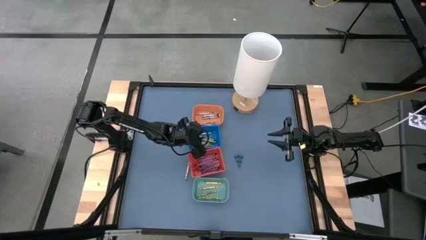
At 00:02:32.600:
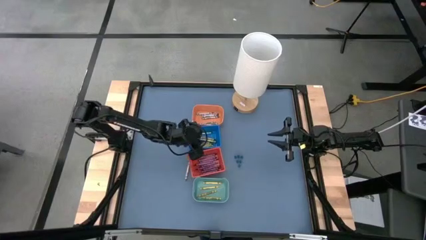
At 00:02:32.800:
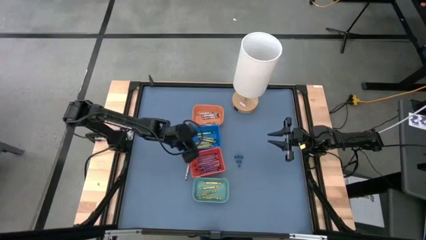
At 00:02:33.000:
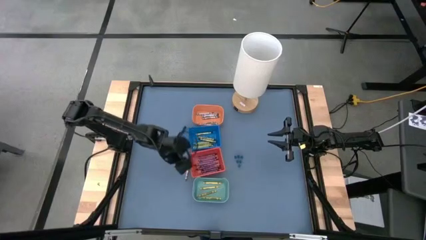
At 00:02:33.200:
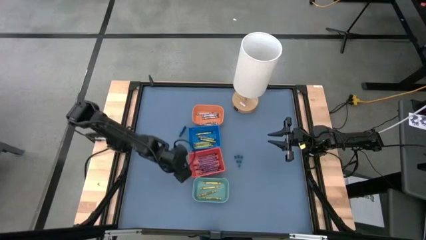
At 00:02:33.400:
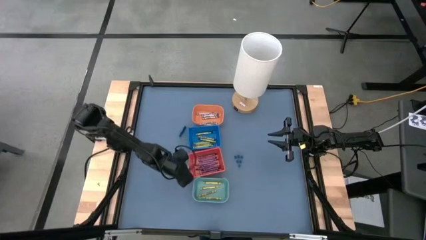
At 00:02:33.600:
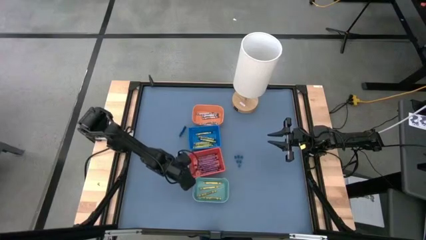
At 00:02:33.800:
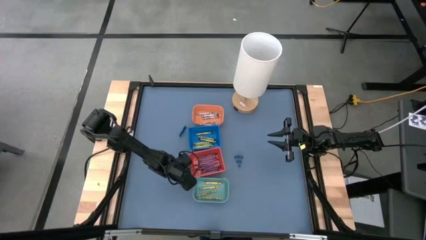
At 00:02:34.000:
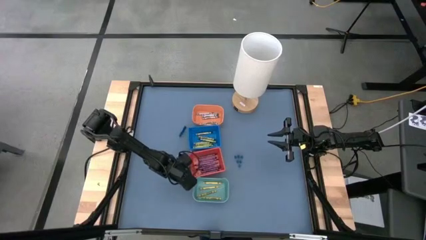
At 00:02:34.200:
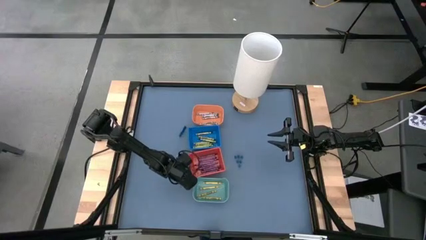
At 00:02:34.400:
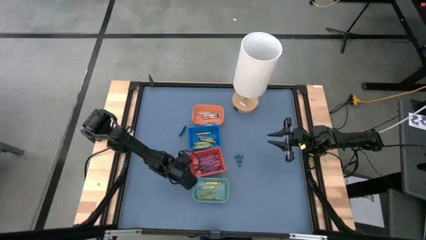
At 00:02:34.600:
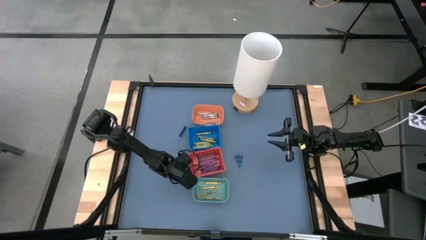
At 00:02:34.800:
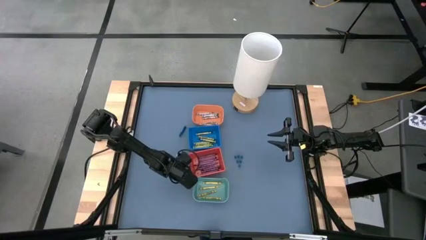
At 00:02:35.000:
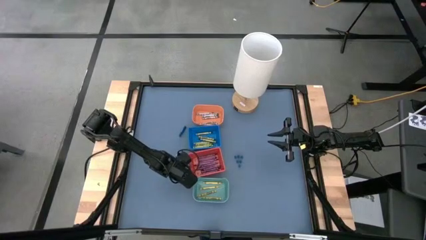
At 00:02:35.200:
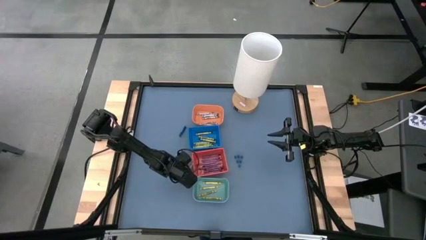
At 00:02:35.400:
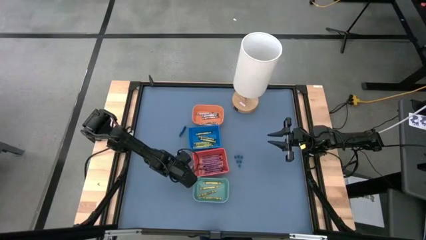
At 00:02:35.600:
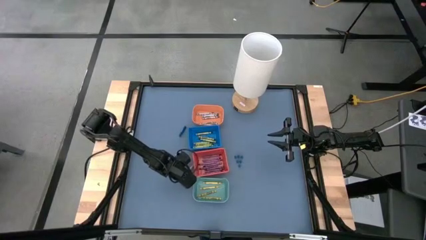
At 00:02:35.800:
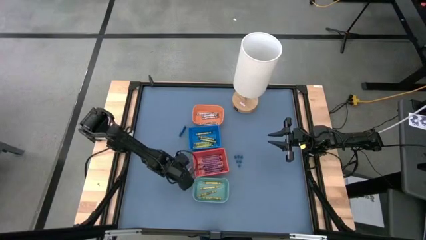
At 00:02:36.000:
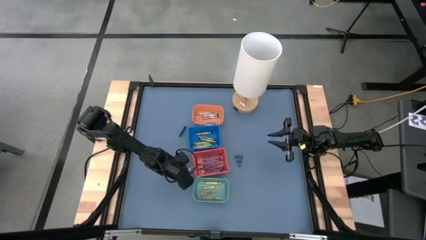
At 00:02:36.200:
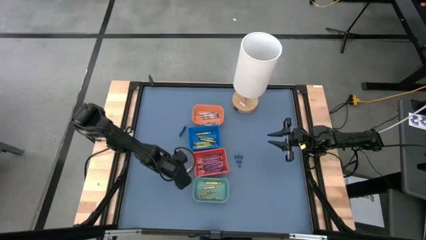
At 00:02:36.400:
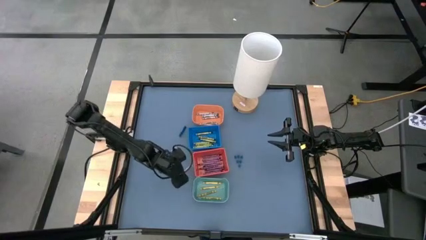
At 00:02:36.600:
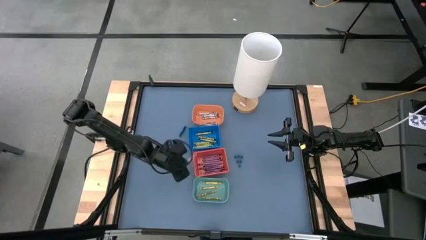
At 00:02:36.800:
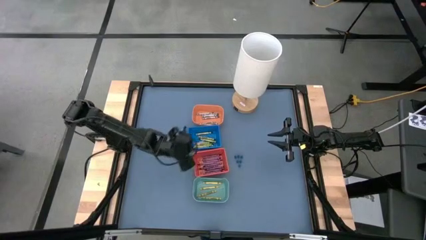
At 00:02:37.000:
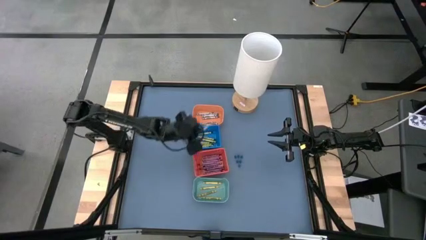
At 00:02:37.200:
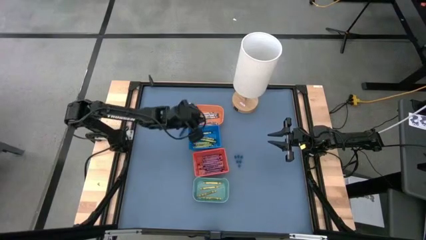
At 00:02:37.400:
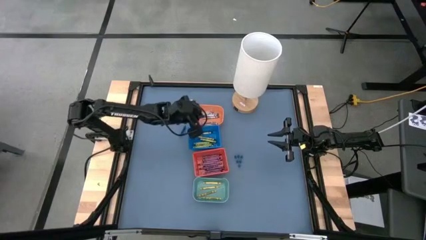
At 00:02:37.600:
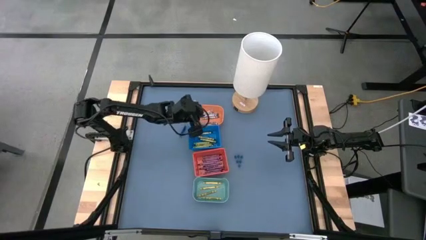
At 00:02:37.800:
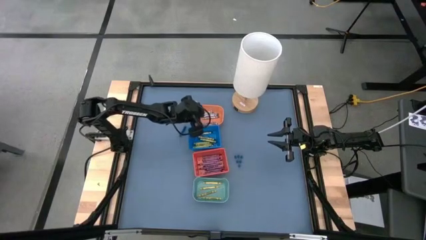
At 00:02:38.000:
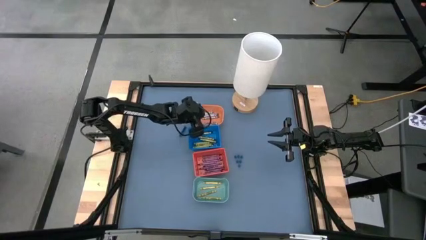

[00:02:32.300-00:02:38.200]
Task: Sort crayons
Put the gray crayon into the orange bin

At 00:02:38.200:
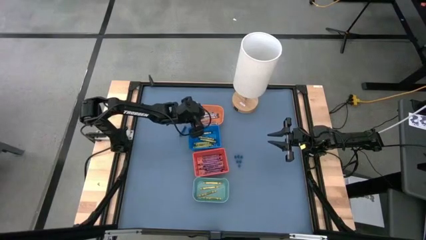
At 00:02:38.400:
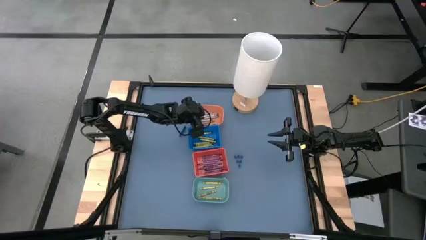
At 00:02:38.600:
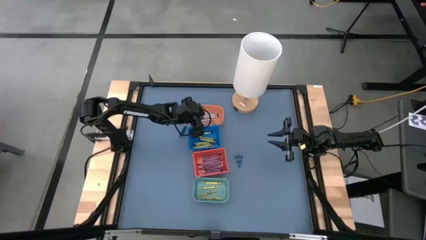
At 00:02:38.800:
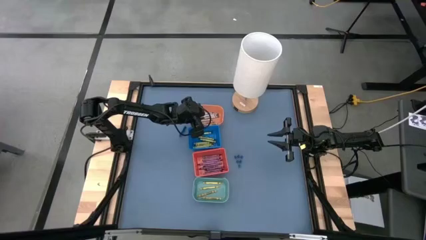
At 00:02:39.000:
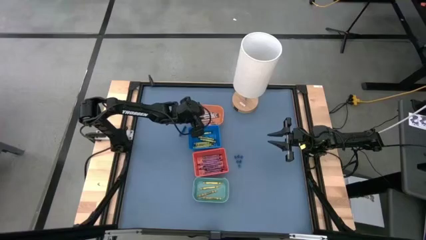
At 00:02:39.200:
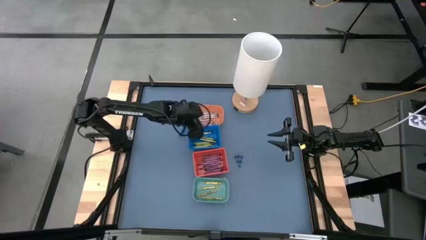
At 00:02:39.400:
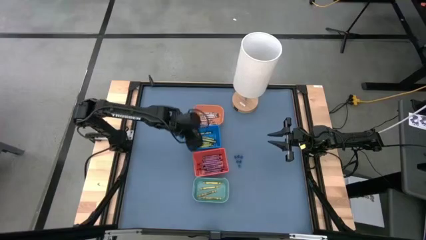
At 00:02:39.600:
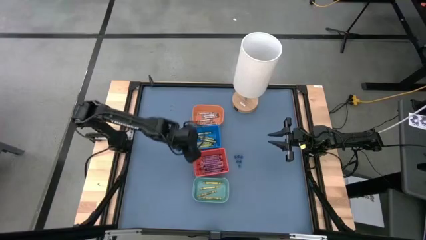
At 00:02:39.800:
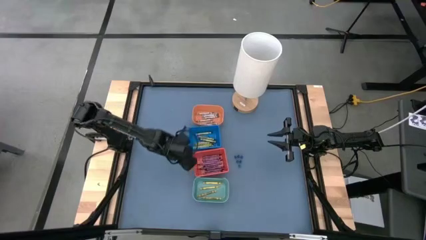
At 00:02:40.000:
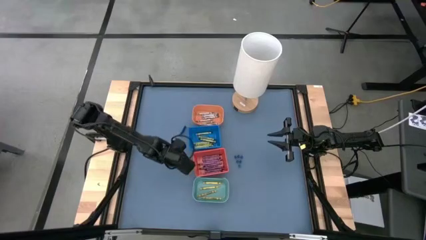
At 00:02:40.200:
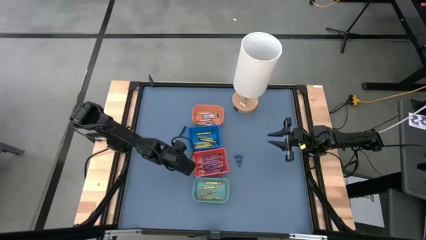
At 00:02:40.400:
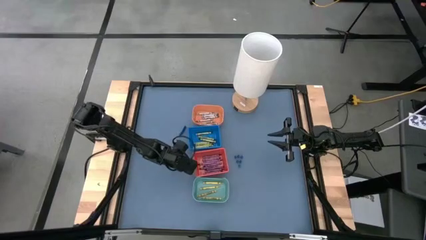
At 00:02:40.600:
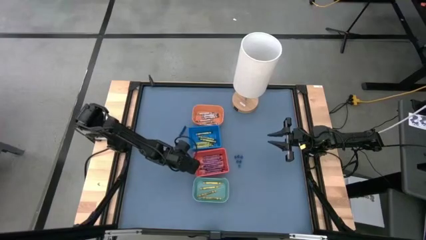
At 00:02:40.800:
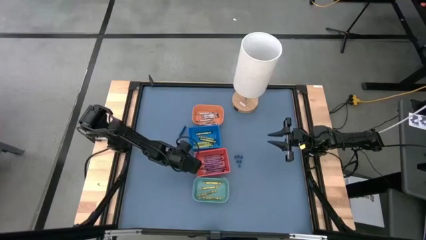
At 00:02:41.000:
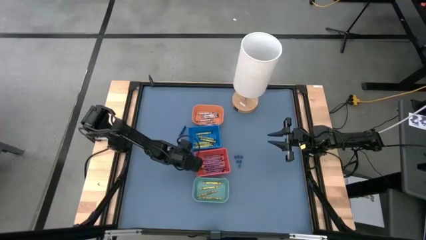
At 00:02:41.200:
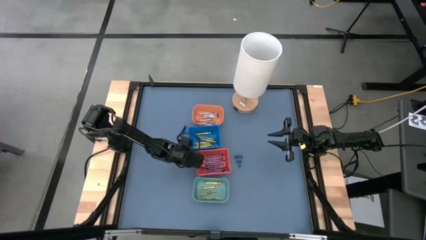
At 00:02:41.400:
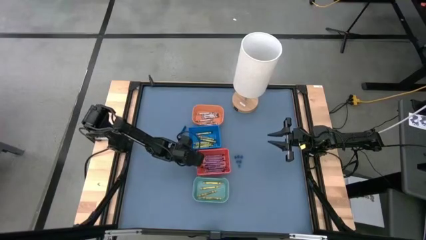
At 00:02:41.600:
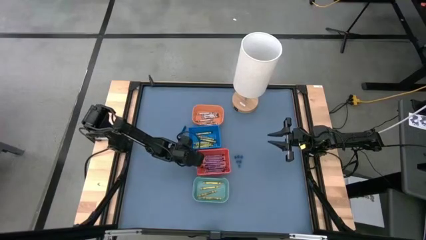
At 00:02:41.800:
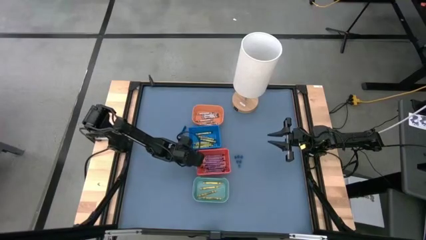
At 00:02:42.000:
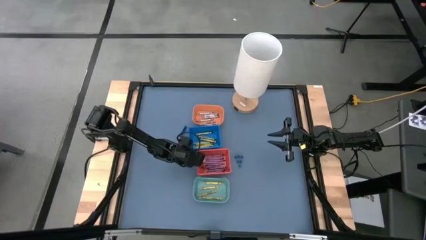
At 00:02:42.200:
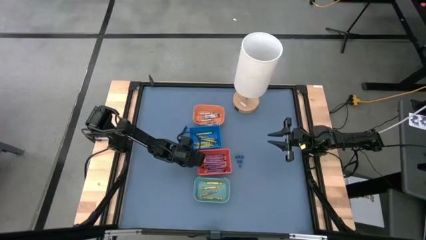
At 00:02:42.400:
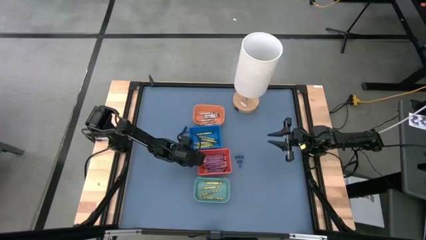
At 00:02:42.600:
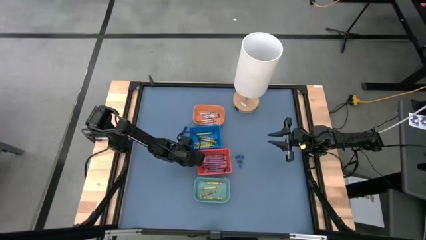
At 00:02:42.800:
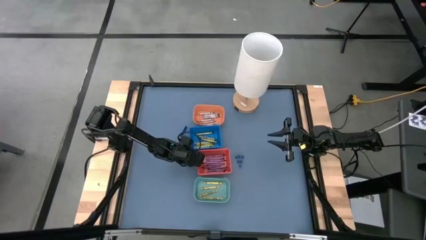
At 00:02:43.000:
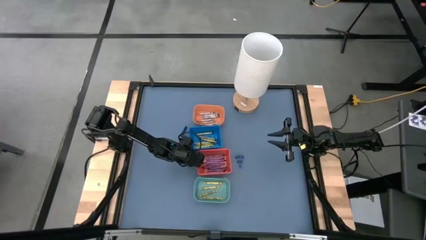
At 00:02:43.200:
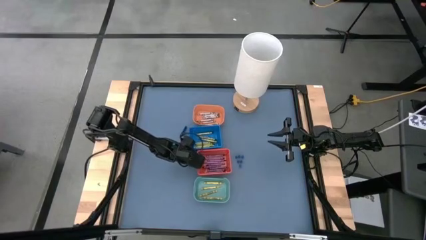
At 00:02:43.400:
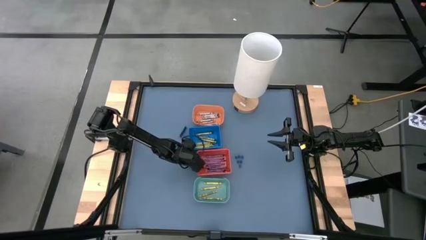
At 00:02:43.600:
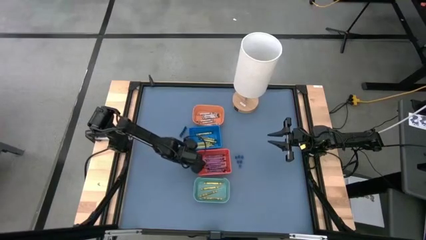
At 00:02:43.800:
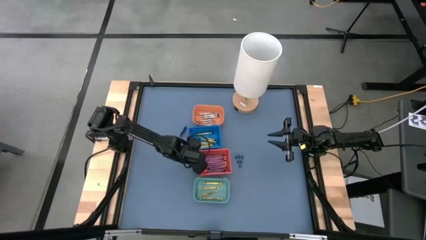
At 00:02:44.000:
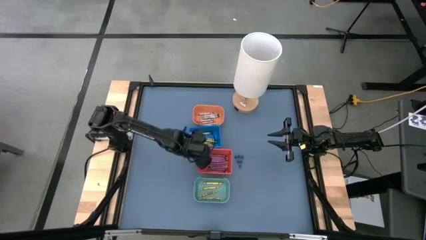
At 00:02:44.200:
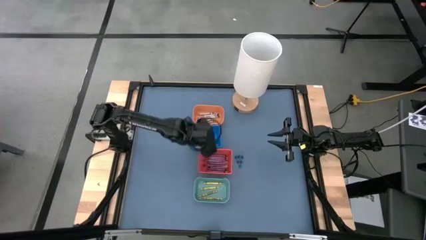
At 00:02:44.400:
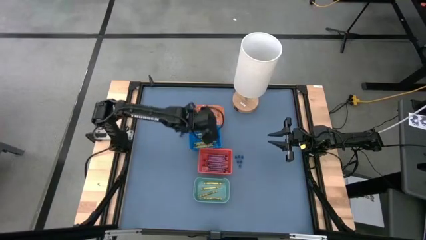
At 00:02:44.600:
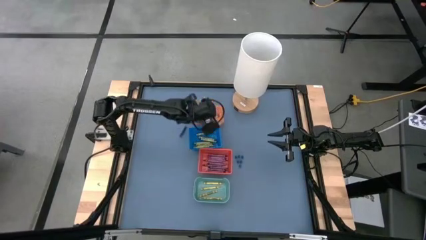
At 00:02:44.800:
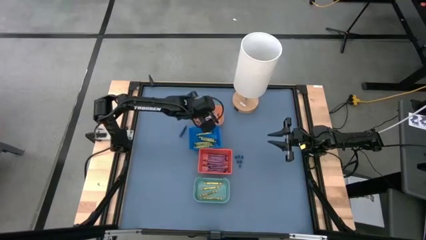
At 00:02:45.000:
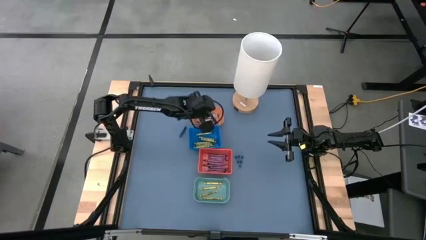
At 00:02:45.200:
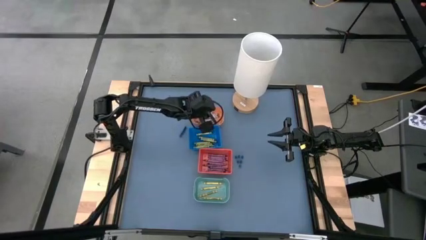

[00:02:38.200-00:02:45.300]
Put the gray crayon into the orange bin

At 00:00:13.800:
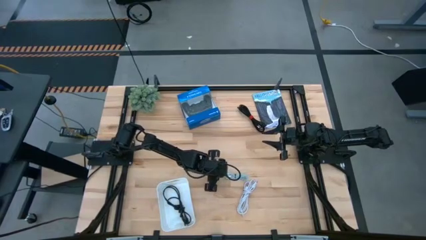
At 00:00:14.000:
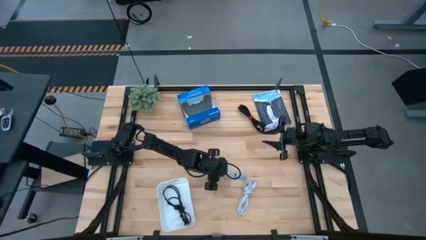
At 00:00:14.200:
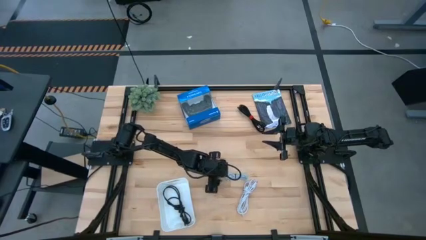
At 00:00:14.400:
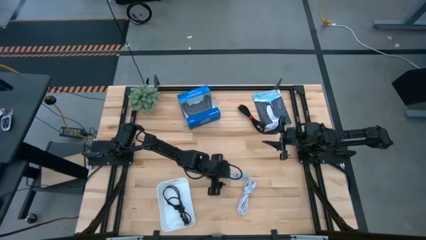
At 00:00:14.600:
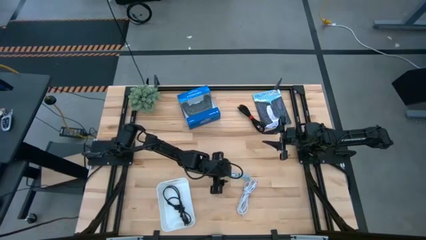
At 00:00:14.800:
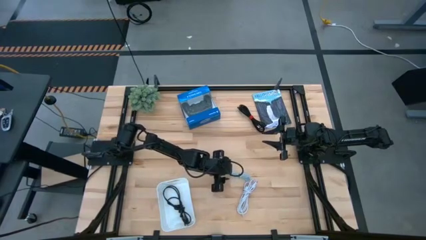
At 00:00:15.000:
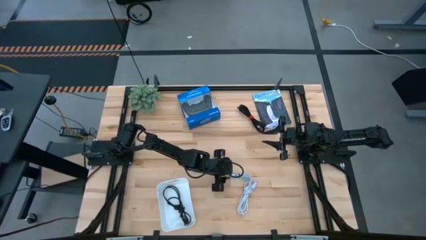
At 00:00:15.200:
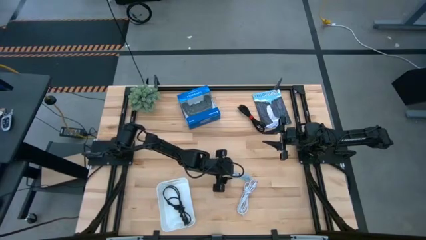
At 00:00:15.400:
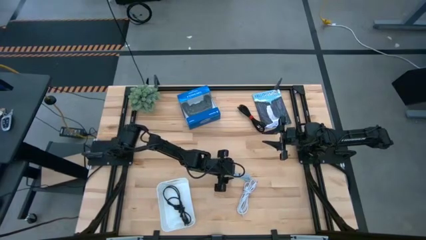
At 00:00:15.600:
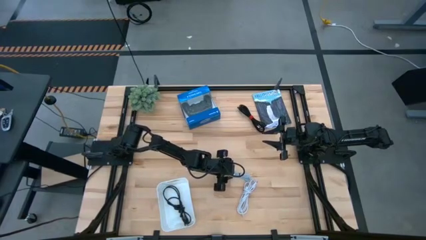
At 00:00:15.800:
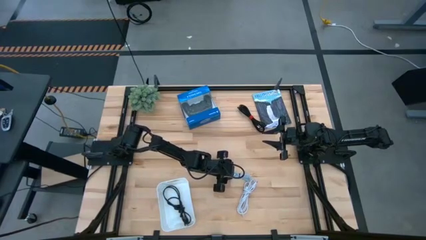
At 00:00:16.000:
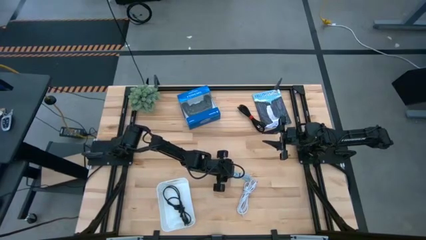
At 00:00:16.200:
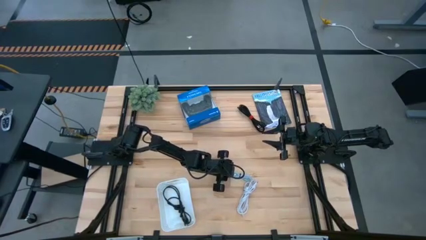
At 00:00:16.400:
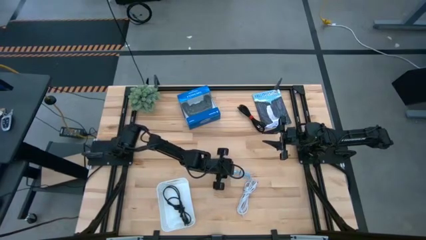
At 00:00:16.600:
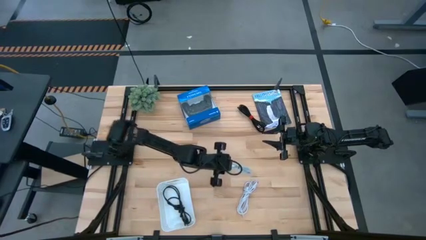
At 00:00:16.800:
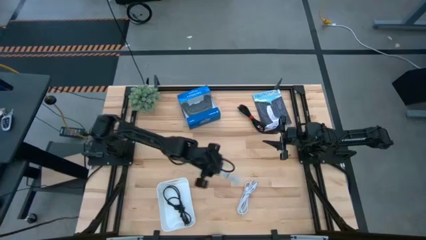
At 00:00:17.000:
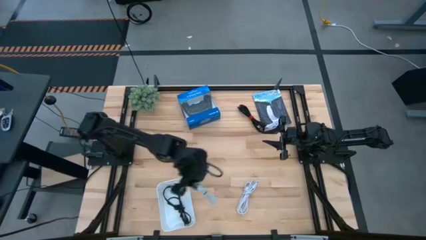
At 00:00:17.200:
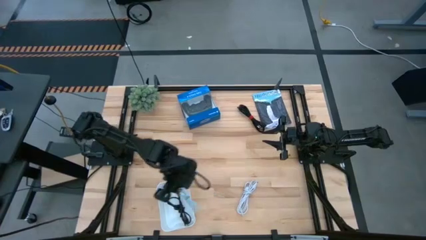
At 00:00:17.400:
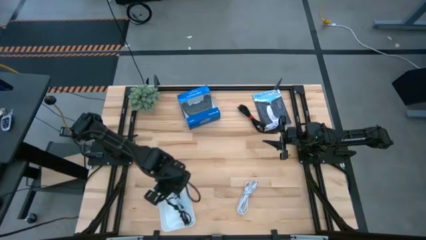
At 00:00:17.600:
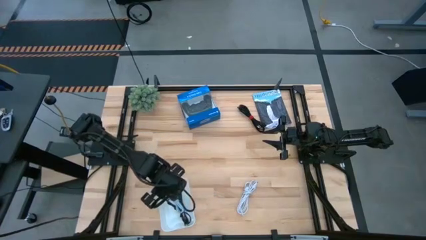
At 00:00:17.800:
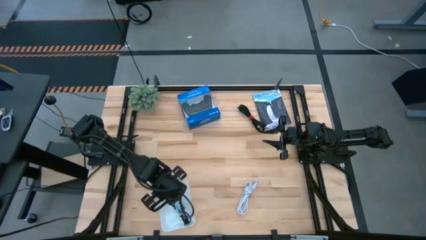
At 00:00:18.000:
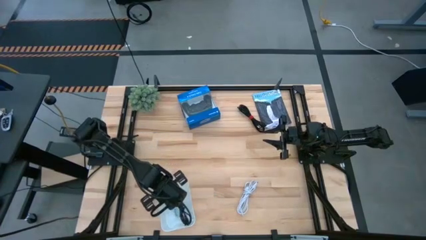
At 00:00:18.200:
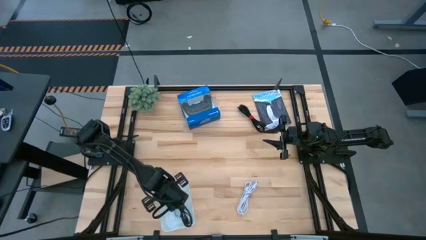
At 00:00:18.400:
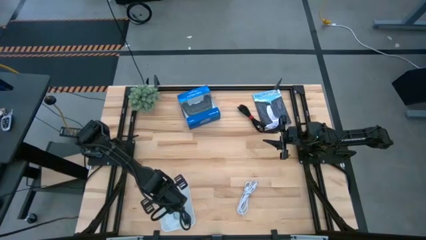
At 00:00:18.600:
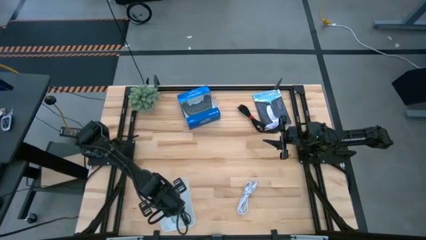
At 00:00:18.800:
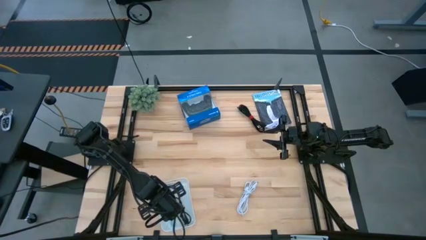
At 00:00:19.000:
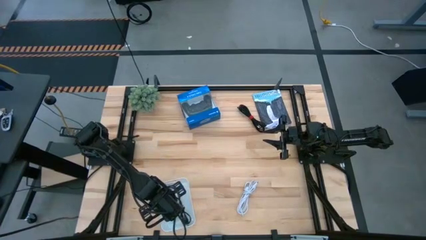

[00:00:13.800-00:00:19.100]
Task: Pick and place USB-C Cables
Put the light blue charger cable into the white bin
